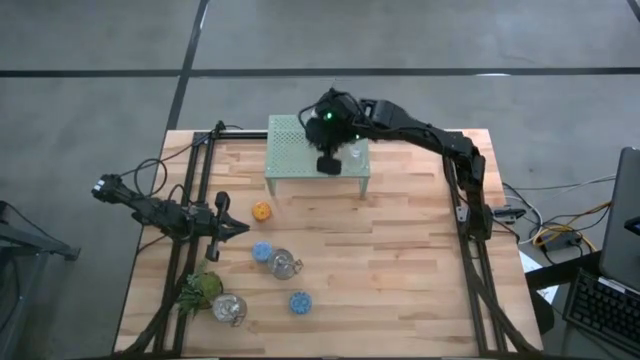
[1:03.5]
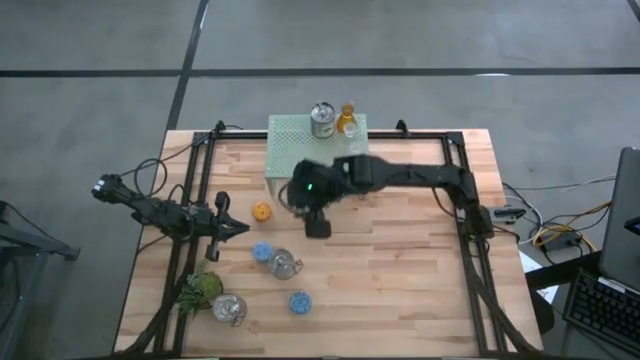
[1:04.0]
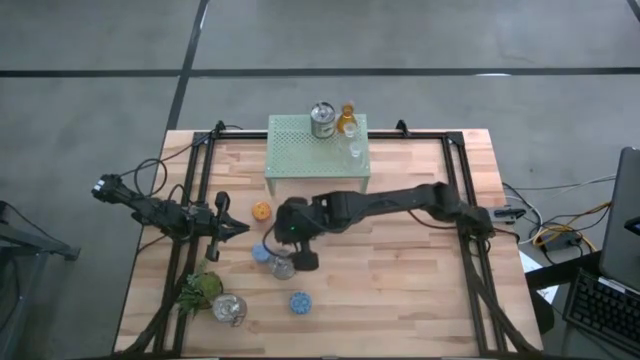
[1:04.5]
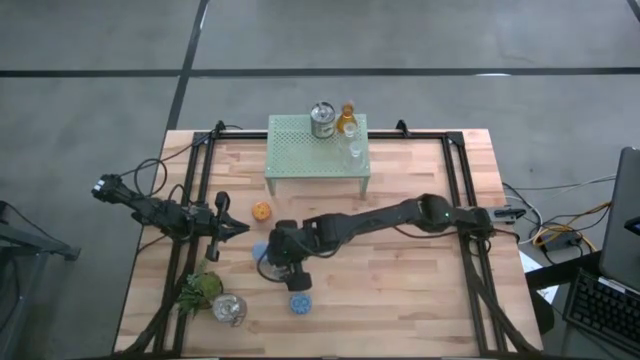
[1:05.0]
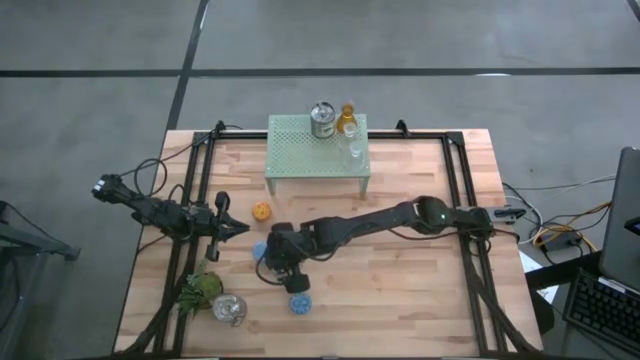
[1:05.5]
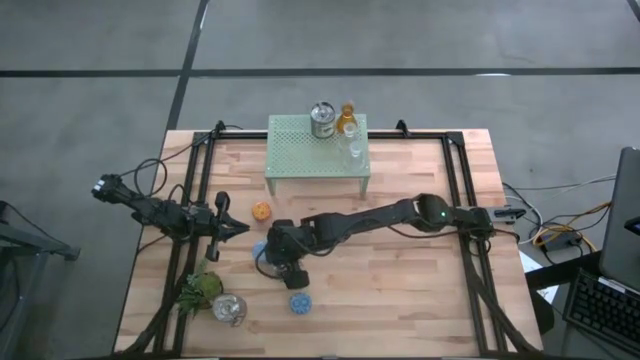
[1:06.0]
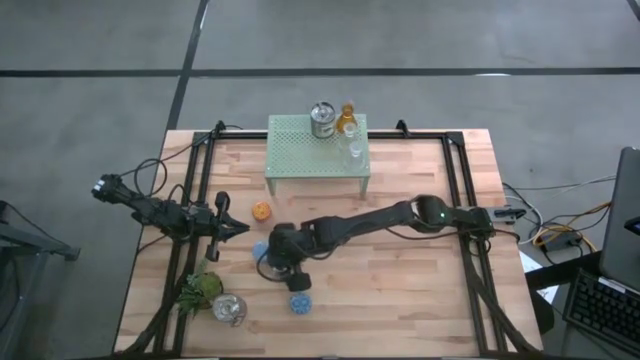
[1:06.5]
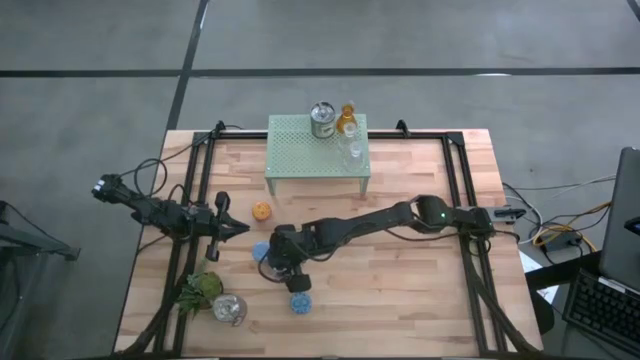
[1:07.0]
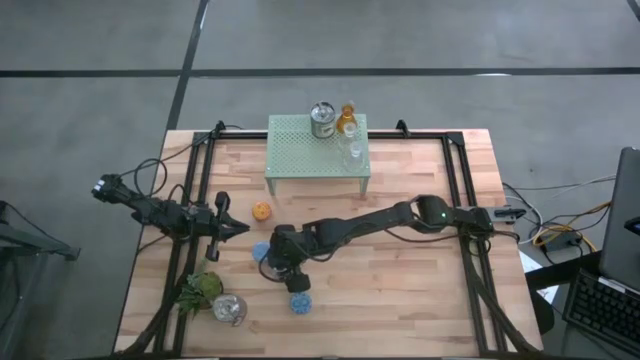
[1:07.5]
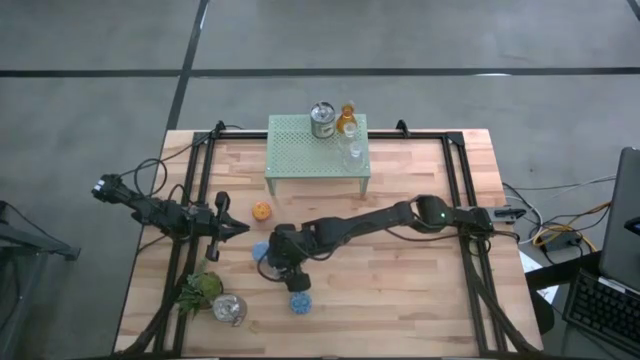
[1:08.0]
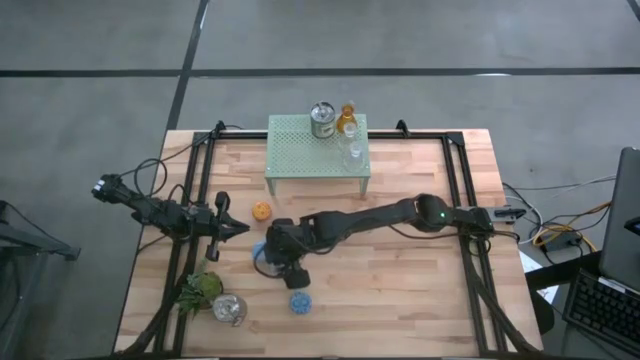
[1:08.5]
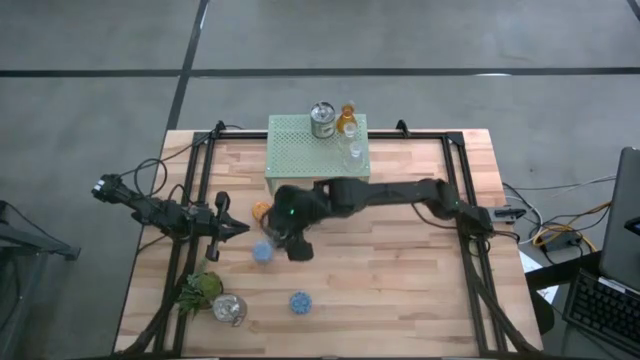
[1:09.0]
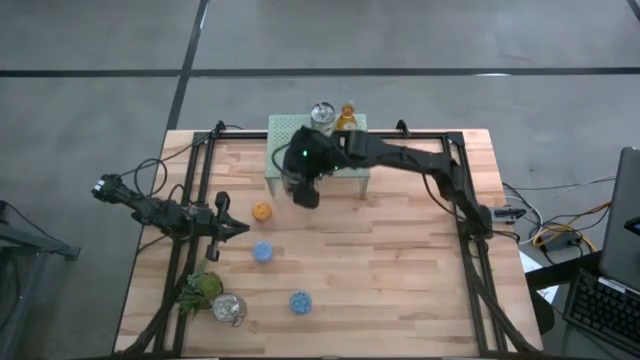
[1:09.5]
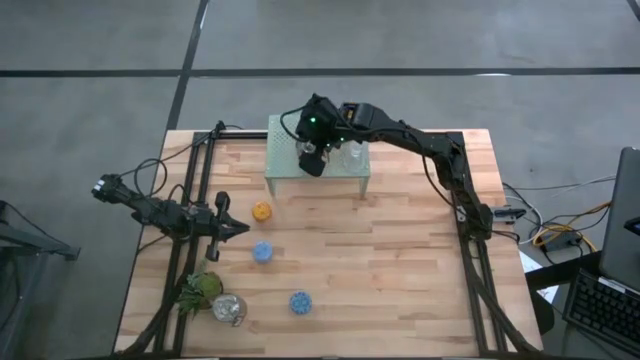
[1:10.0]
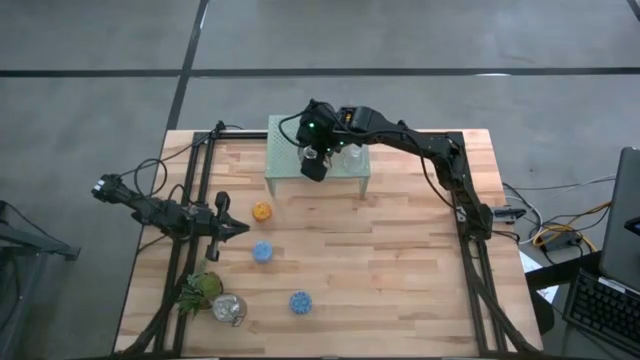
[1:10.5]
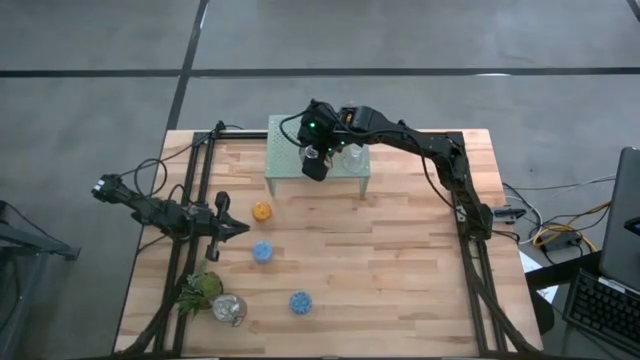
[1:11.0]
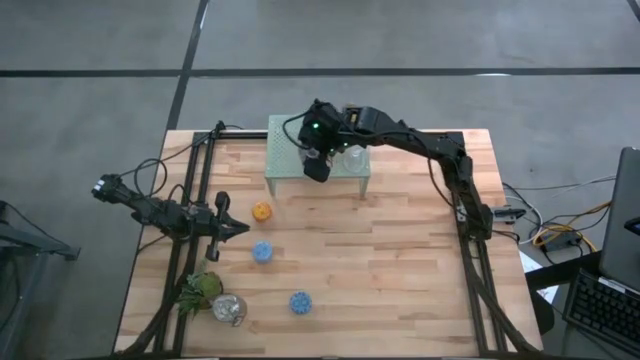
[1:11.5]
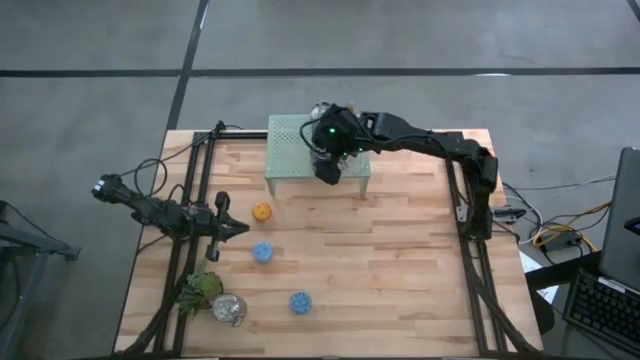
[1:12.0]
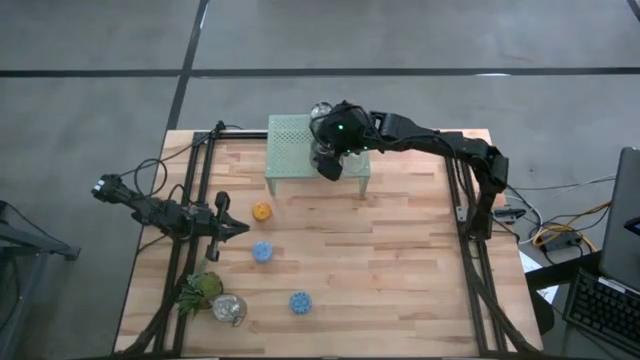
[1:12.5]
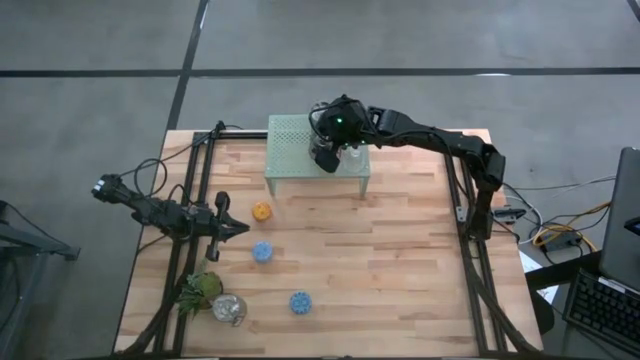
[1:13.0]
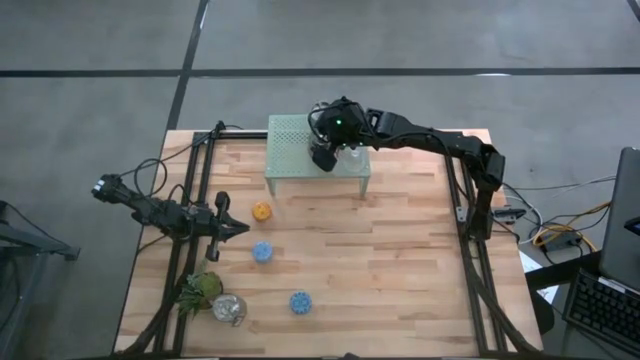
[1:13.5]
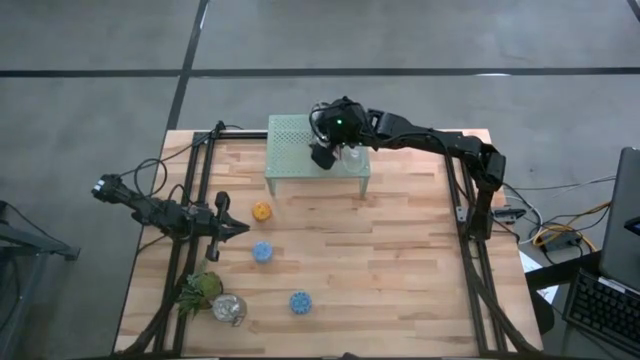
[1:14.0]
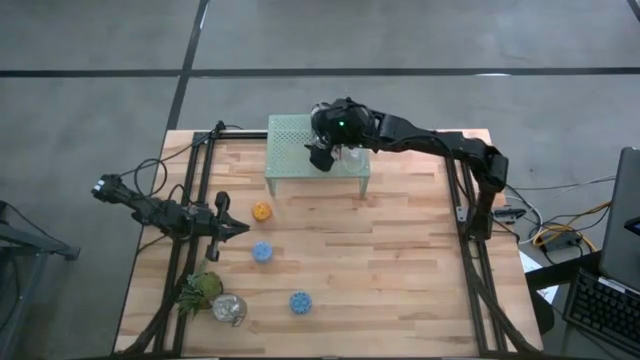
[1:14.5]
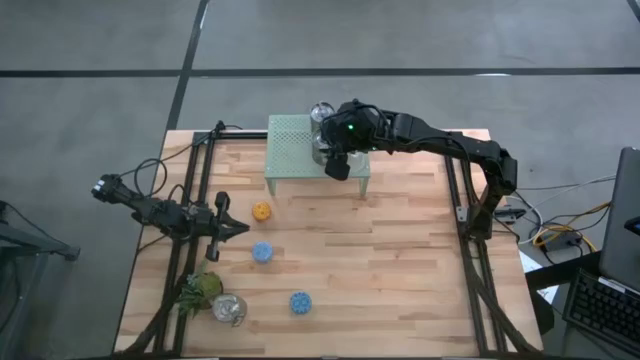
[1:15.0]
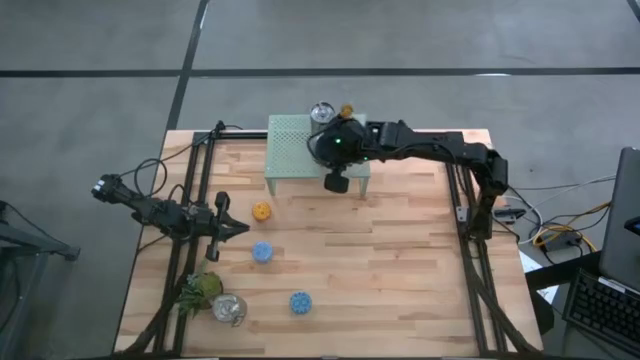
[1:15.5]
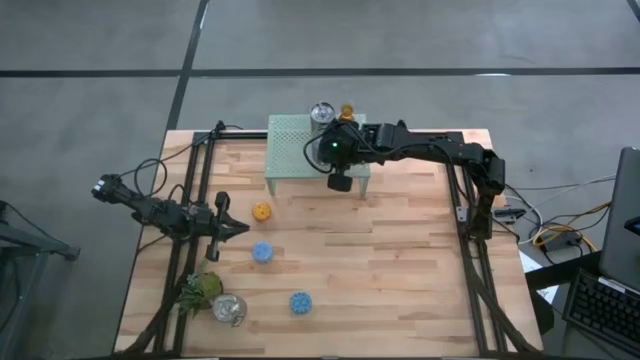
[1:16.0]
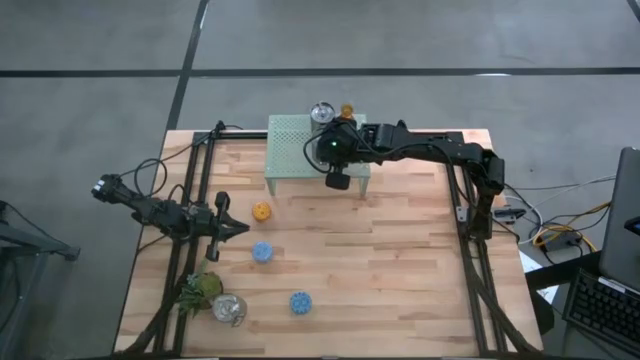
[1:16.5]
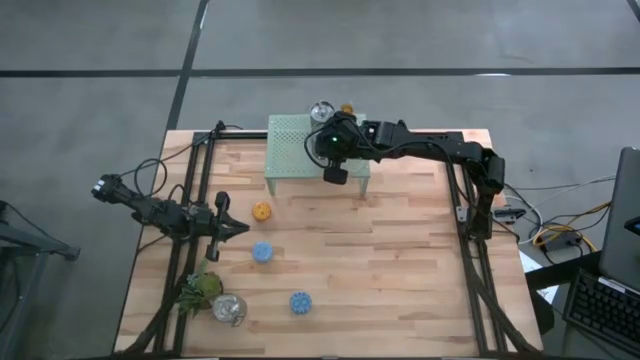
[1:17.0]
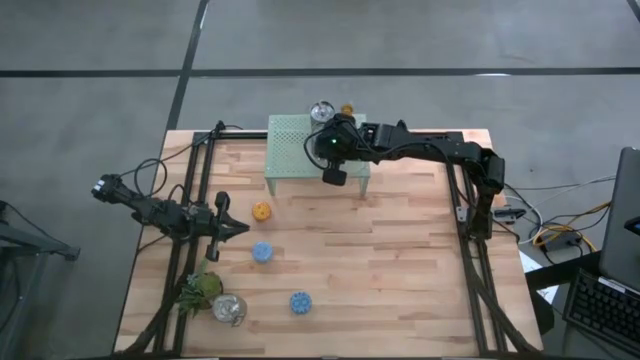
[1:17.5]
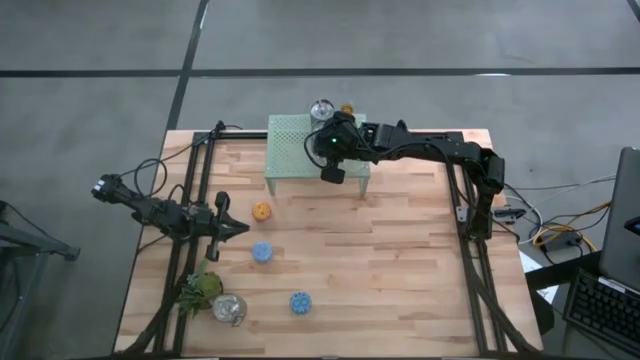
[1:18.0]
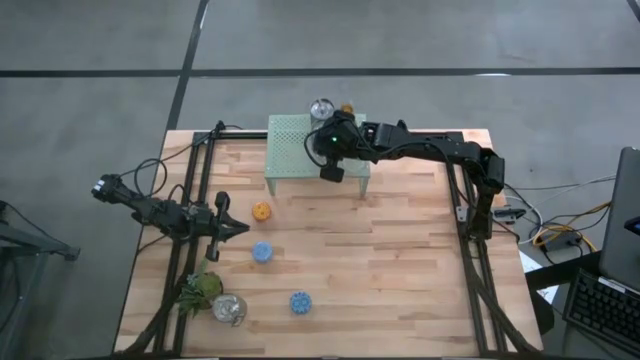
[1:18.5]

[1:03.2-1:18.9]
Task: Pick & Place candle stick holders
Put the top brown scented candle on the shelf

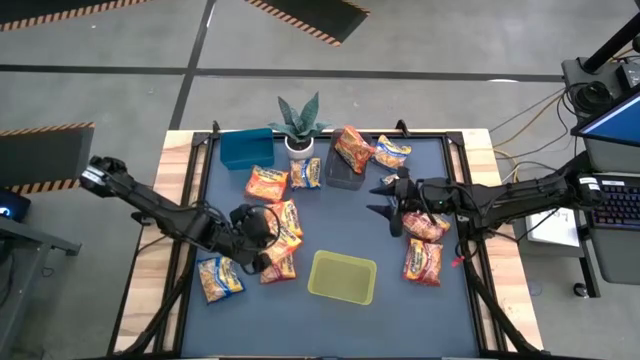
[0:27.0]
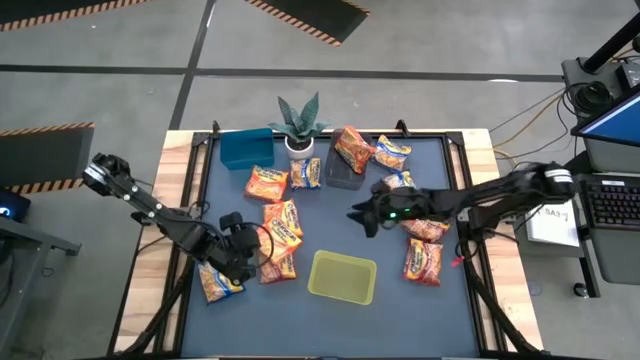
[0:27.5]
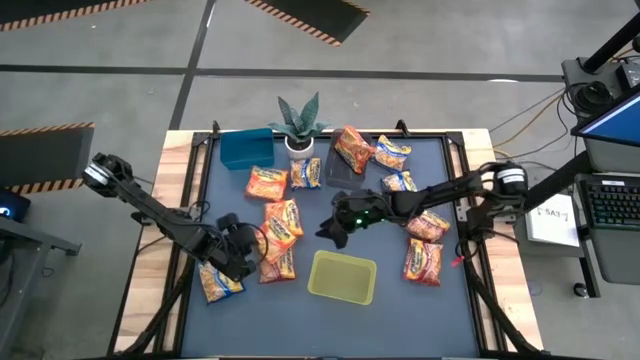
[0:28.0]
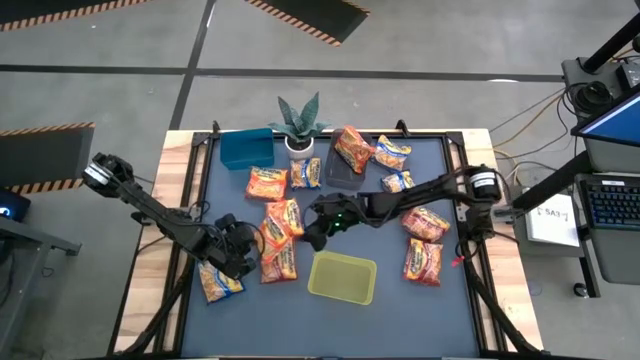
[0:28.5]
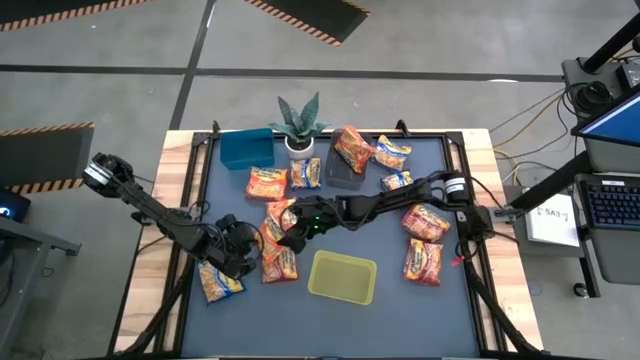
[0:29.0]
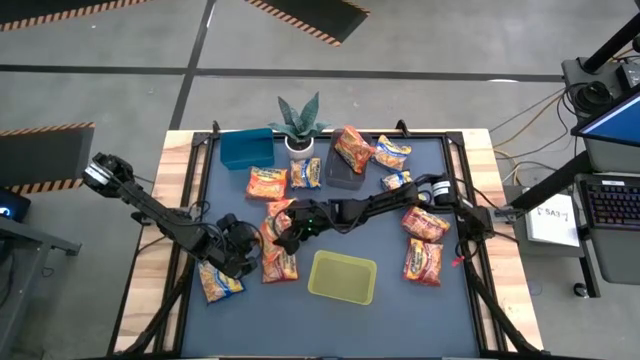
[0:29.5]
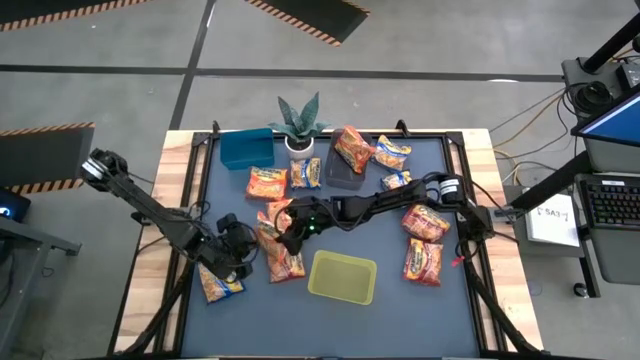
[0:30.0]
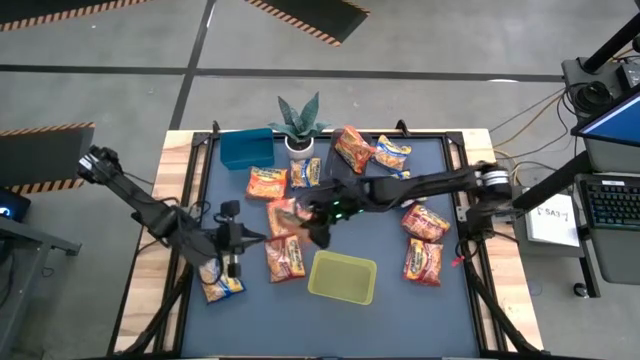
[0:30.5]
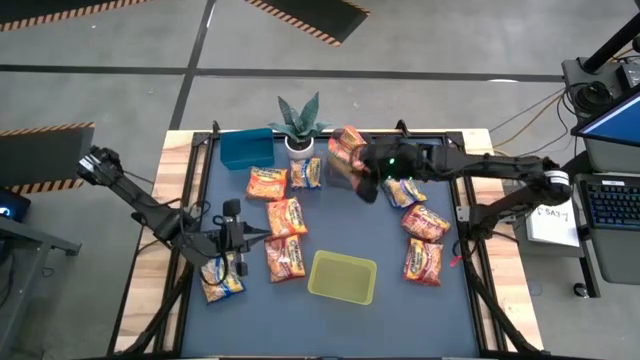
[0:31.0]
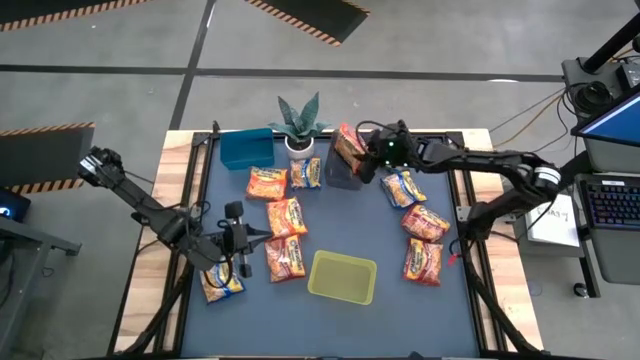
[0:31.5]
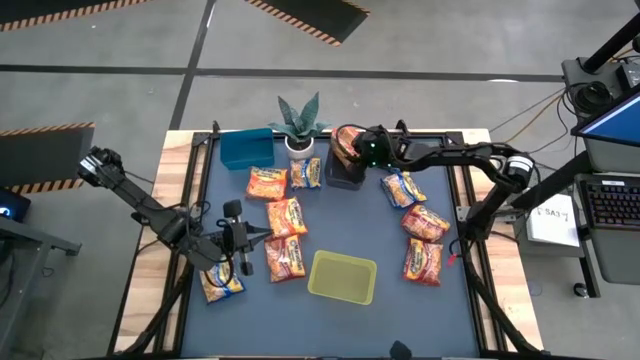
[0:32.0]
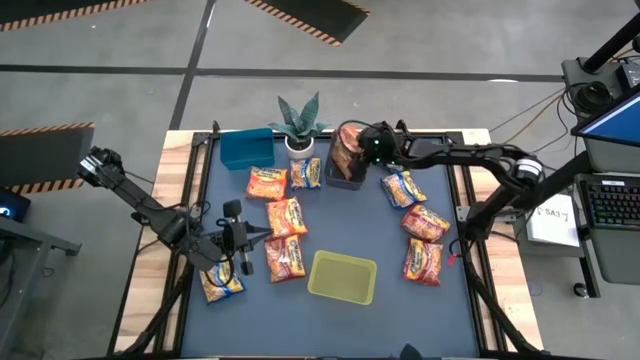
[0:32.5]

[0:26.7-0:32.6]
Task: Sort Maruchan noodles
Put the orange bag into the black bin

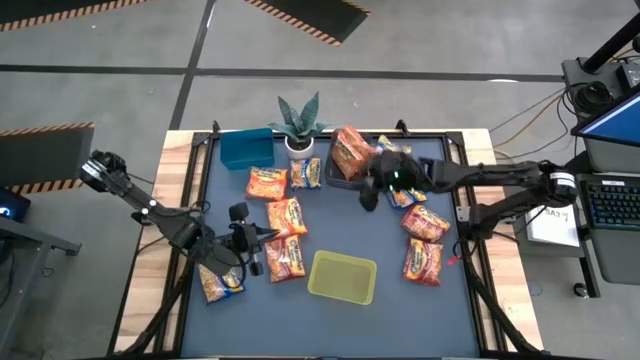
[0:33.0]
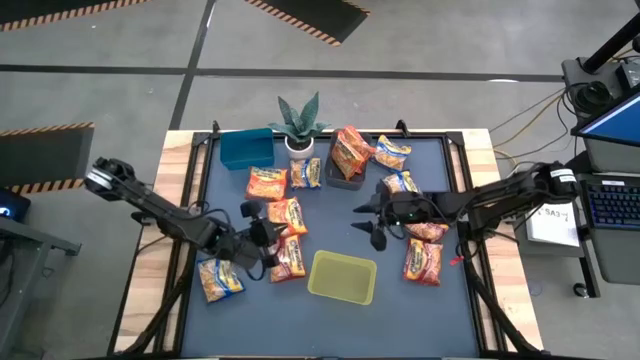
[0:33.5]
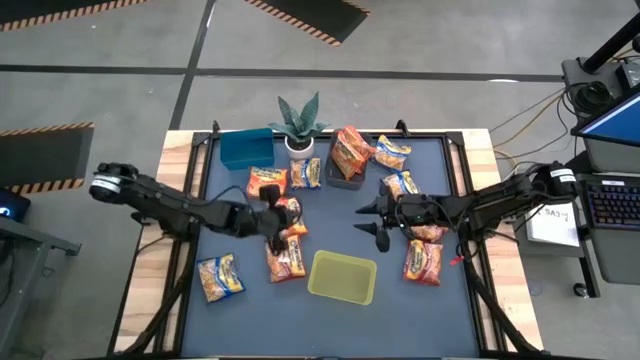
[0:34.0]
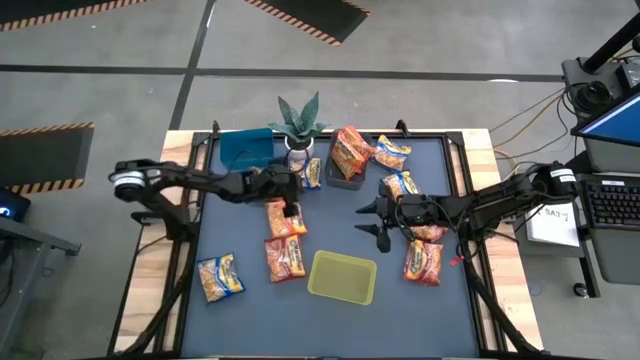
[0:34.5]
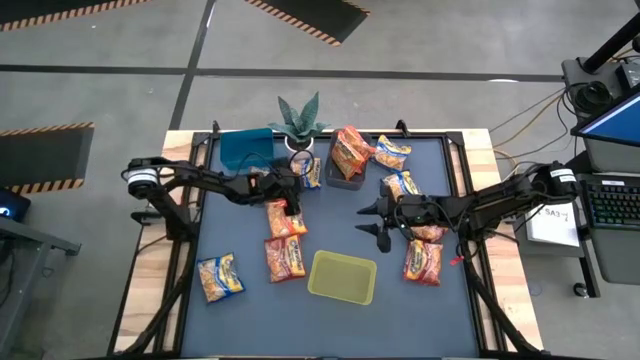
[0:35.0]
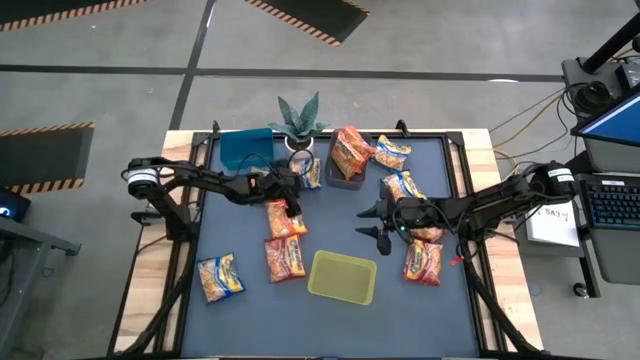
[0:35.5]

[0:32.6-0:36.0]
Put the blue bag into the blue bin
